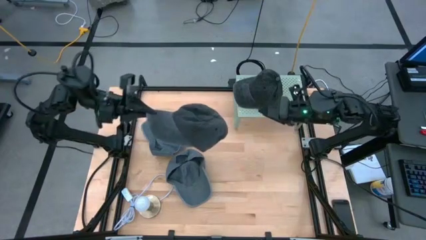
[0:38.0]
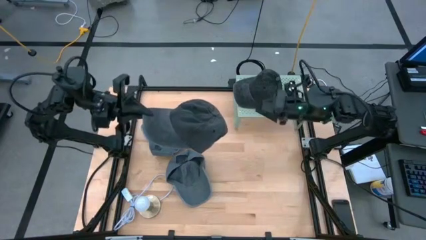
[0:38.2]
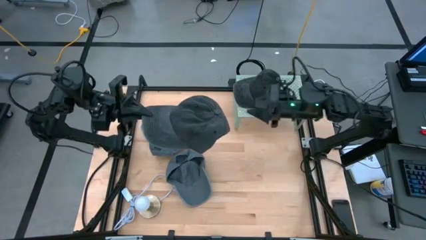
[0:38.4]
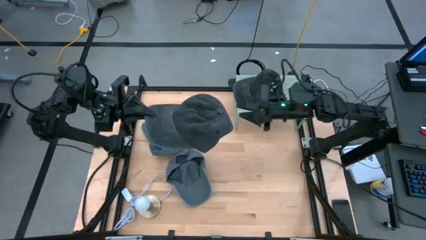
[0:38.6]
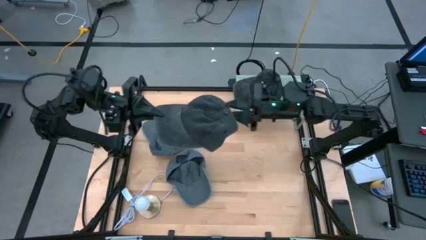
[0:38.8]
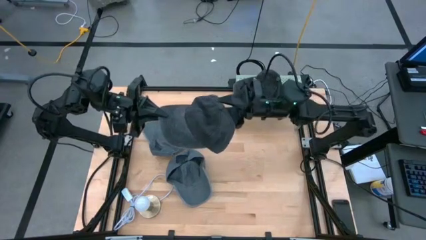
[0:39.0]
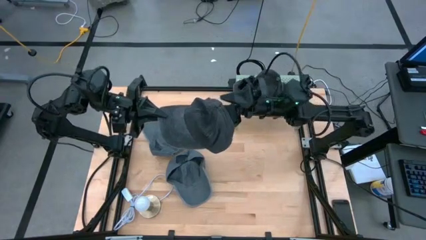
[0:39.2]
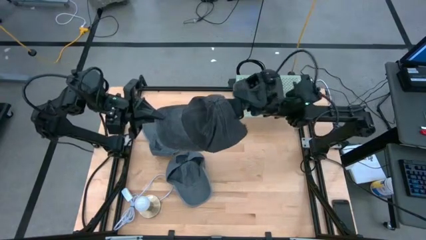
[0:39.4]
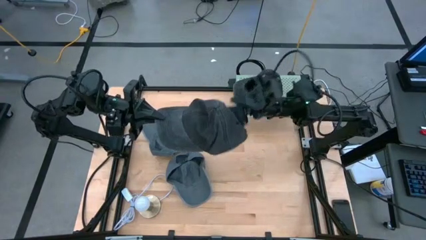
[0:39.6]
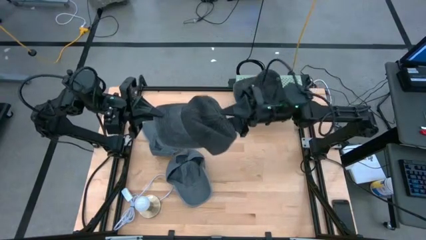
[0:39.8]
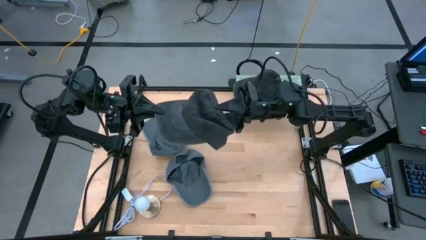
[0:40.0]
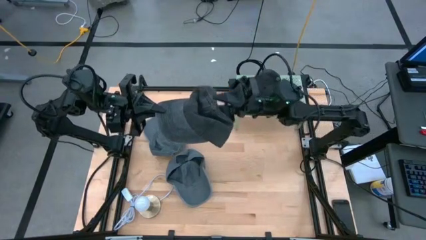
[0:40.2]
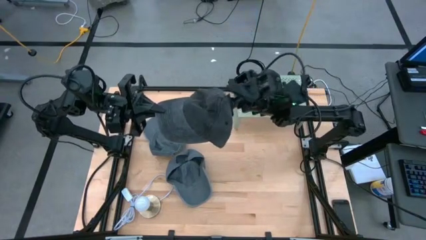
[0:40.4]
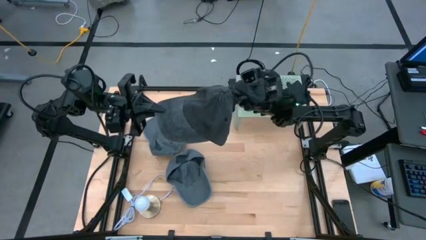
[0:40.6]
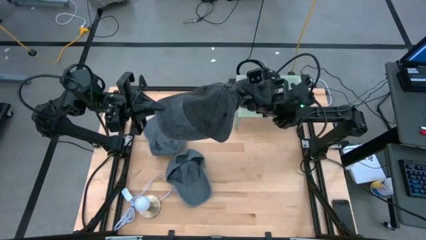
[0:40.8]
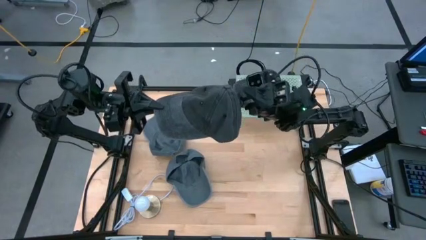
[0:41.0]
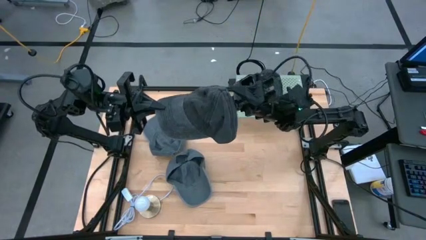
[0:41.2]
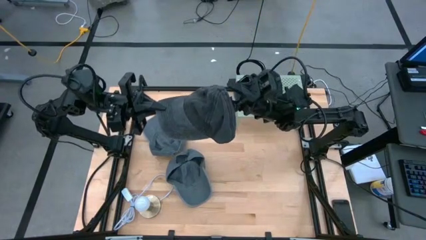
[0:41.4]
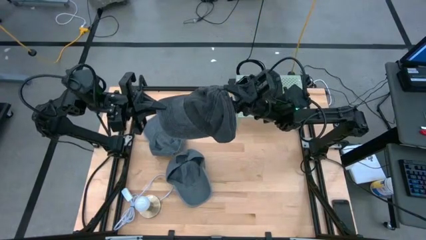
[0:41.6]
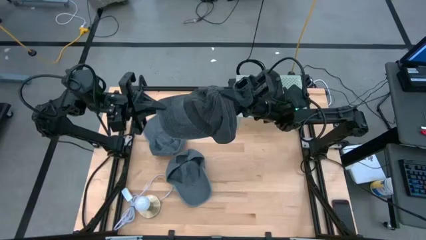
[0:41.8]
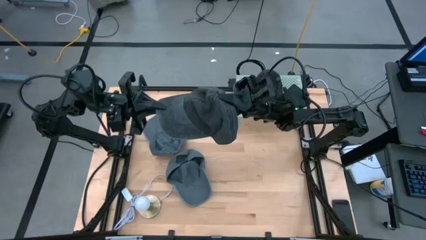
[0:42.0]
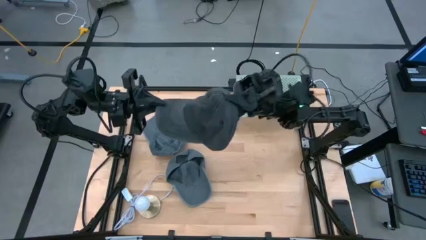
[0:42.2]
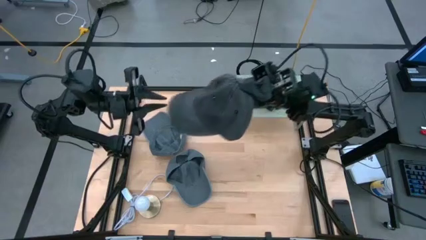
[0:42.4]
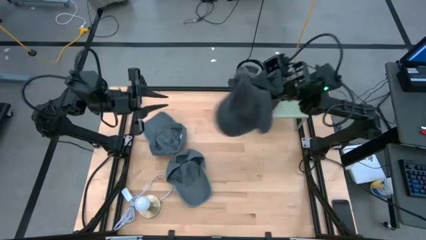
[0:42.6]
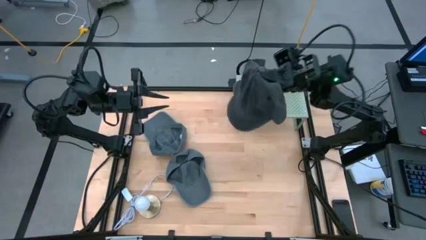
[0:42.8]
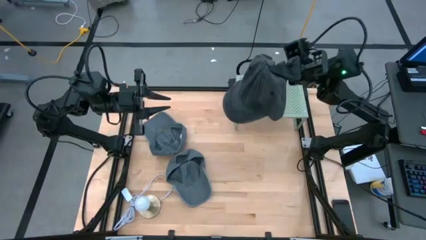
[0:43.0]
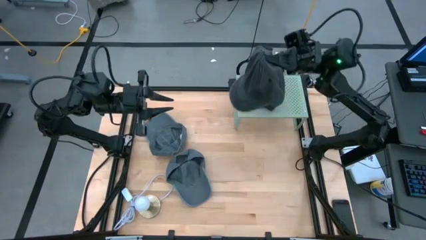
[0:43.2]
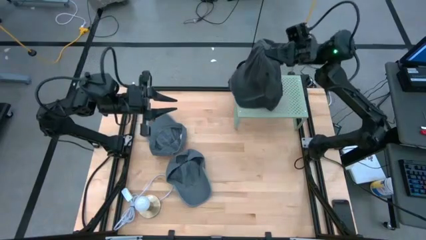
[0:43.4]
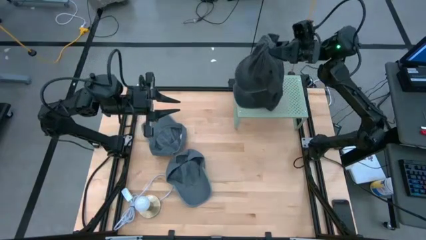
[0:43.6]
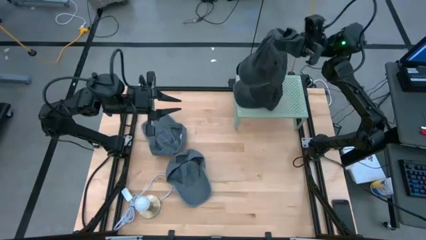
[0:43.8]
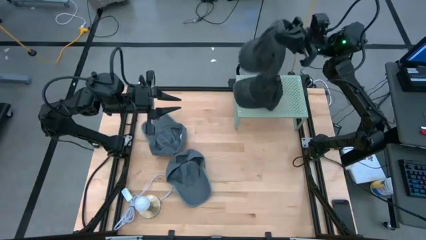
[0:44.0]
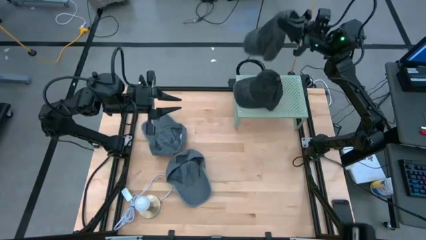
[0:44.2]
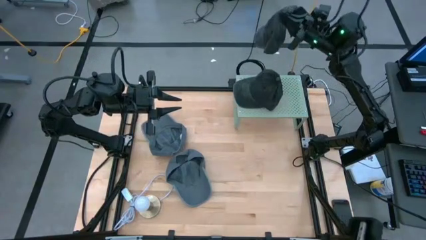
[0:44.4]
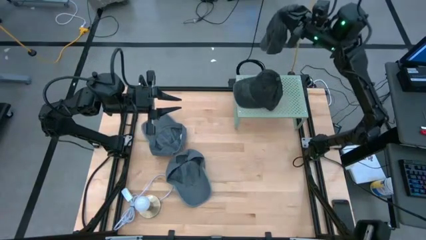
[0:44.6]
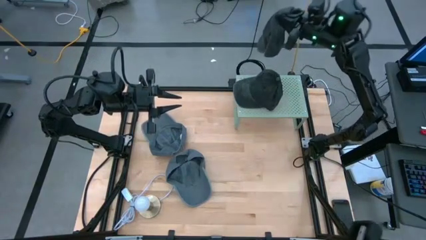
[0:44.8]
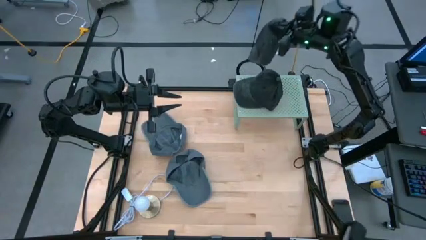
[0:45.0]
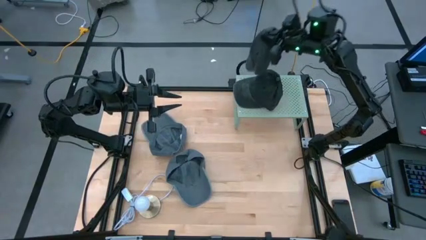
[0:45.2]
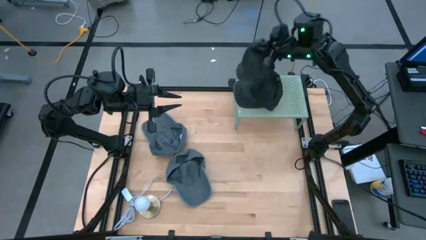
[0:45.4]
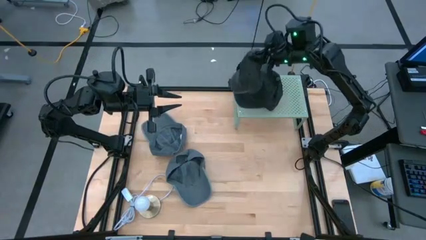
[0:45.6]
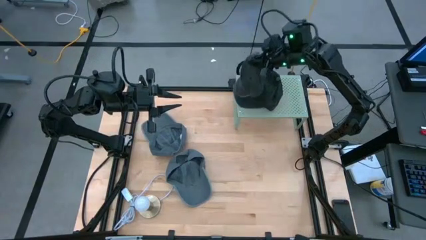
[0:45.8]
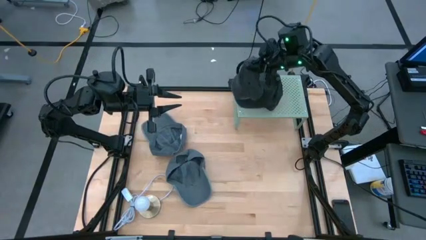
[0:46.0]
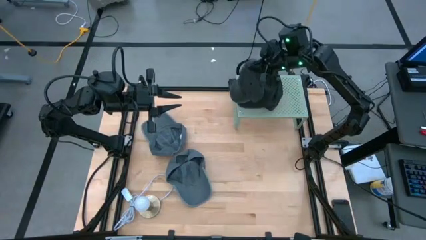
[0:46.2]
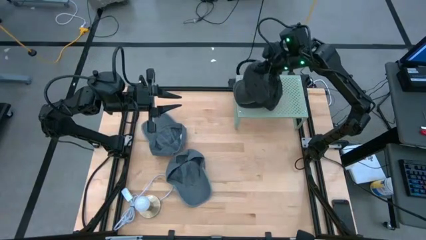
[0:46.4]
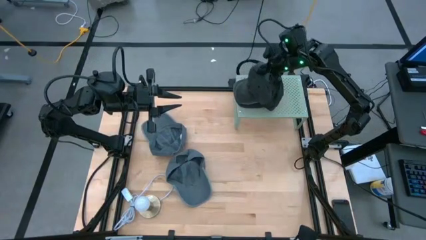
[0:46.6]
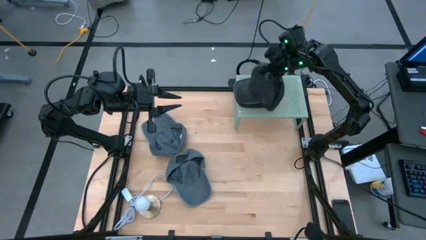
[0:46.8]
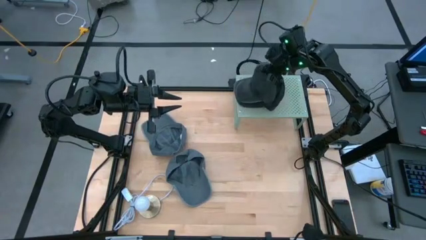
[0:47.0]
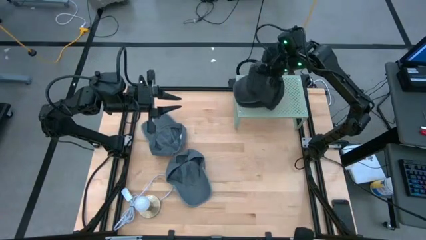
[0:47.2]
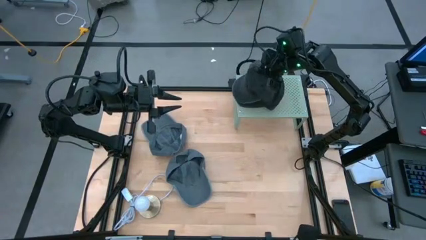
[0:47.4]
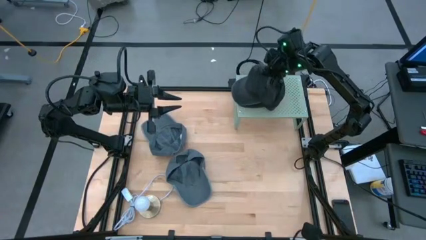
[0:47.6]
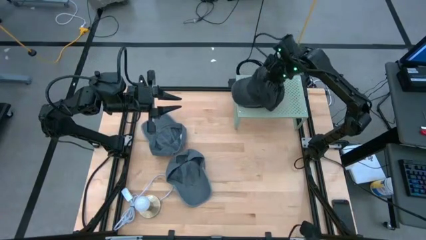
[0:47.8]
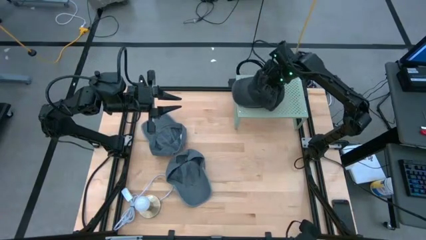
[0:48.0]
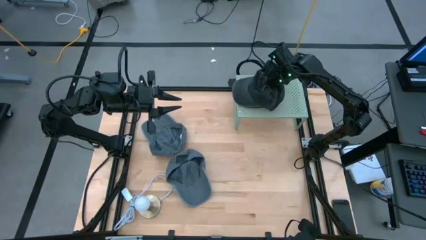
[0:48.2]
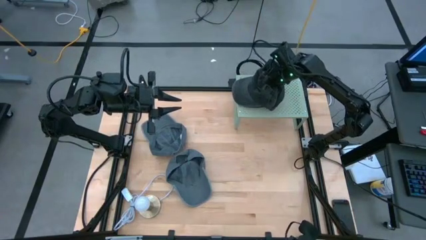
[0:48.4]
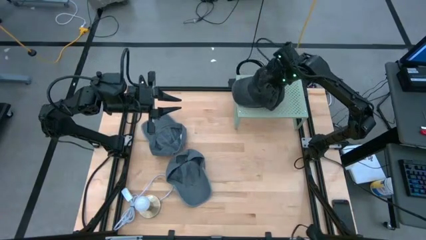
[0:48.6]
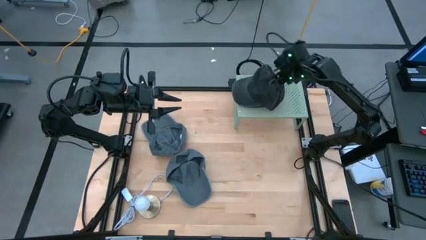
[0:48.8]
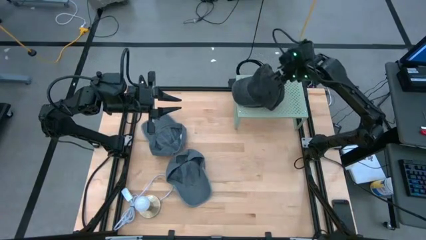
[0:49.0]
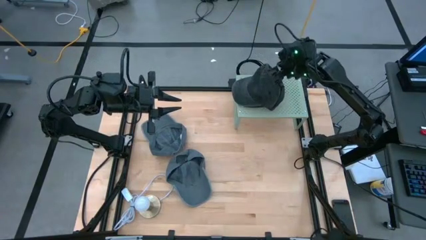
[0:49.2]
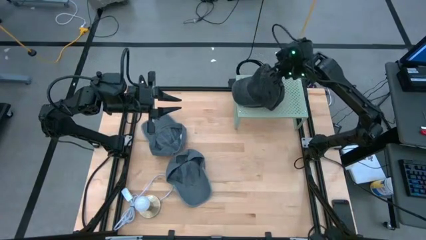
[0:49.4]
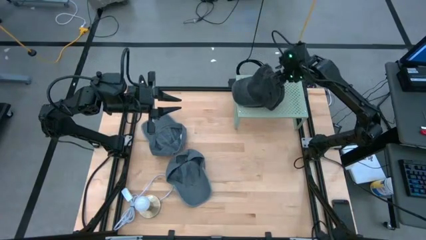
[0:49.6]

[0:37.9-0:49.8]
Task: Pick & Place hat
Stack the black cap on the black cap on the shelf
